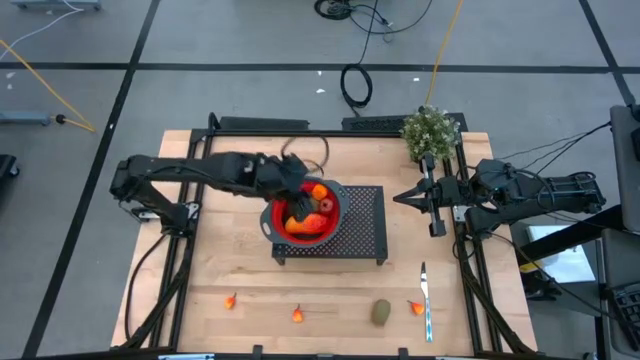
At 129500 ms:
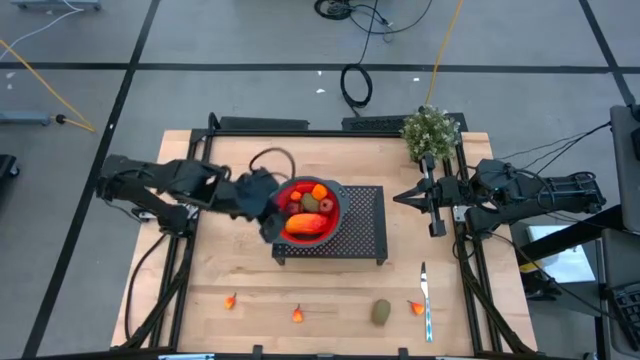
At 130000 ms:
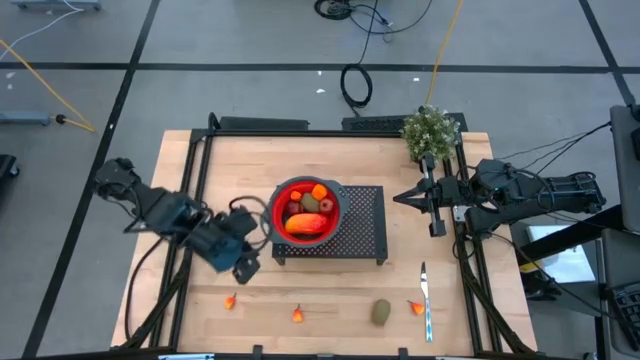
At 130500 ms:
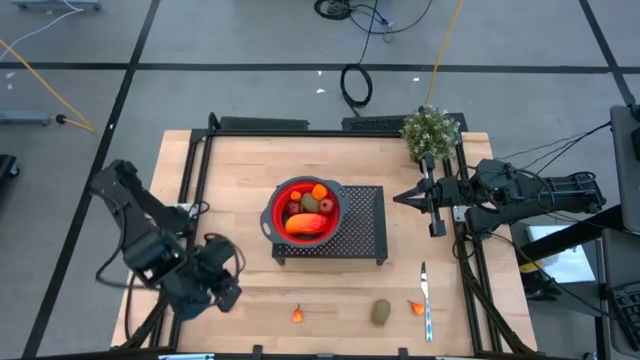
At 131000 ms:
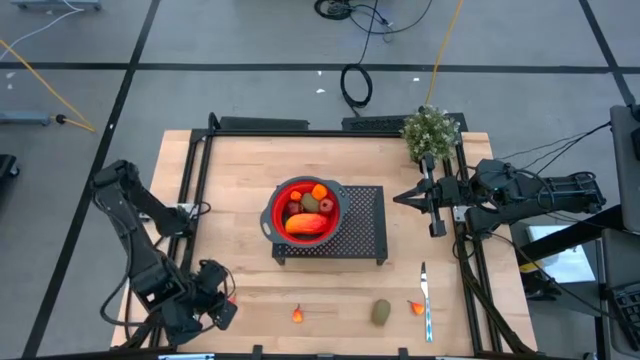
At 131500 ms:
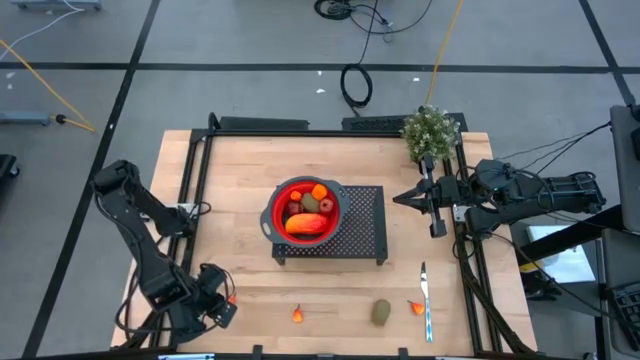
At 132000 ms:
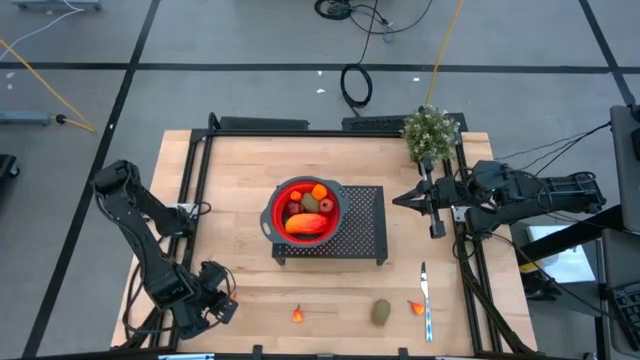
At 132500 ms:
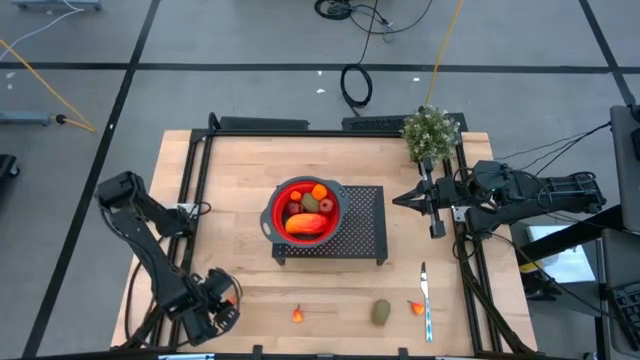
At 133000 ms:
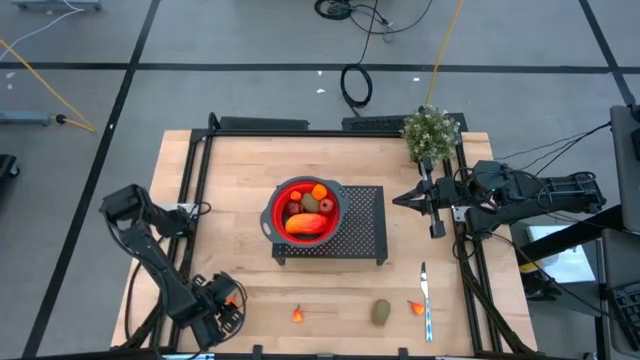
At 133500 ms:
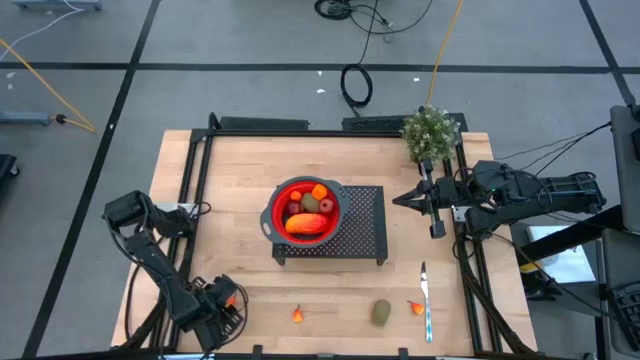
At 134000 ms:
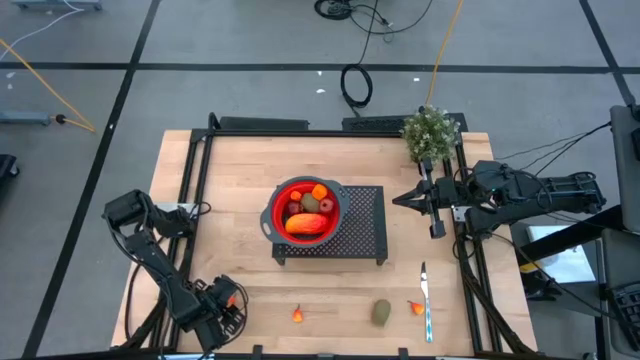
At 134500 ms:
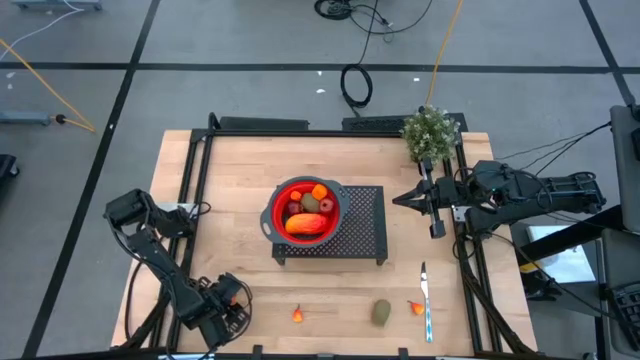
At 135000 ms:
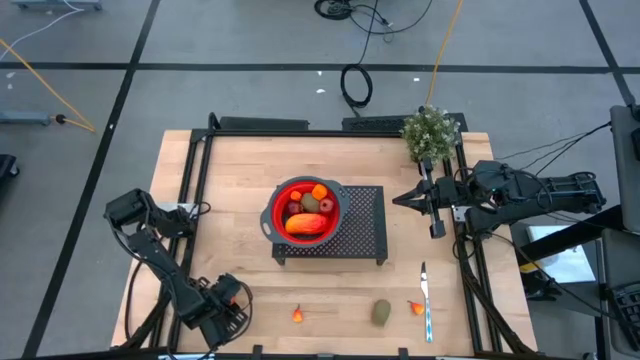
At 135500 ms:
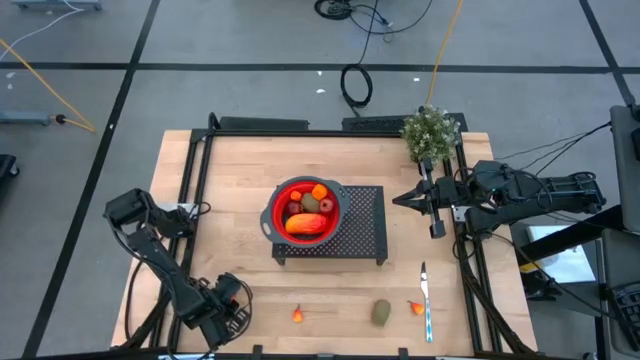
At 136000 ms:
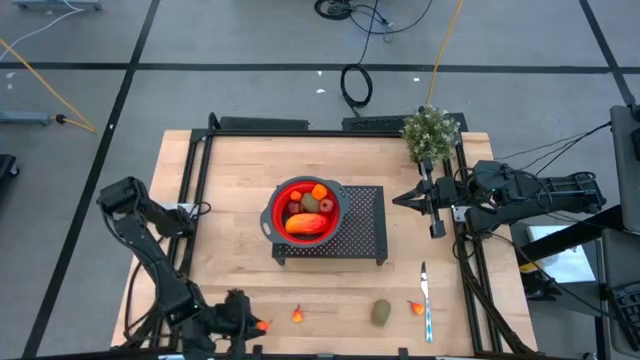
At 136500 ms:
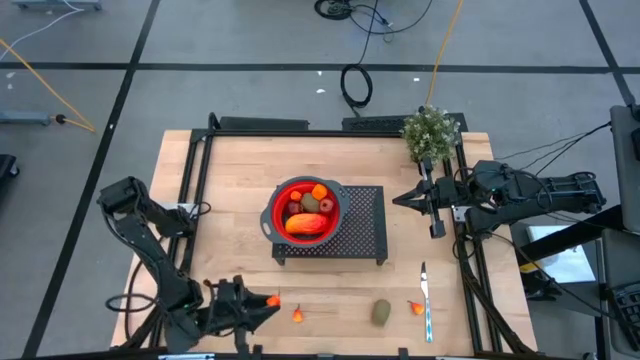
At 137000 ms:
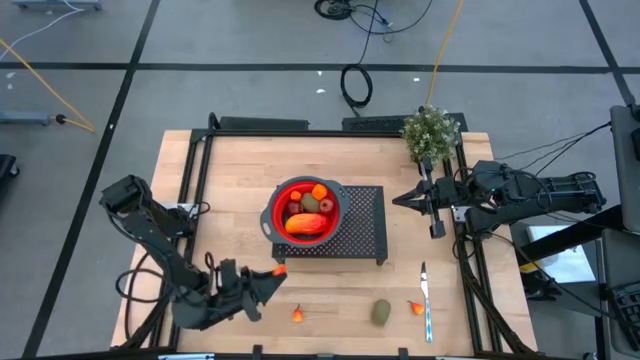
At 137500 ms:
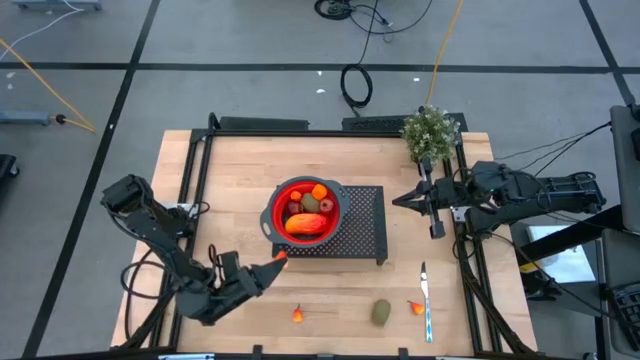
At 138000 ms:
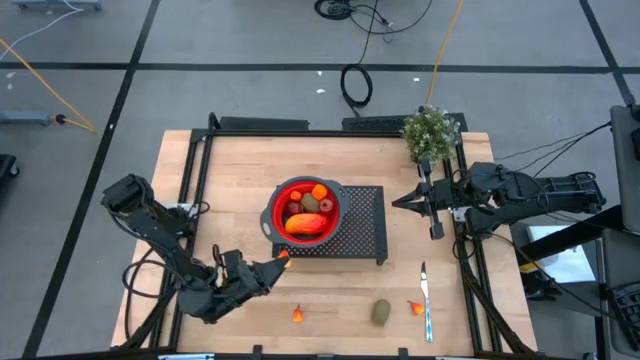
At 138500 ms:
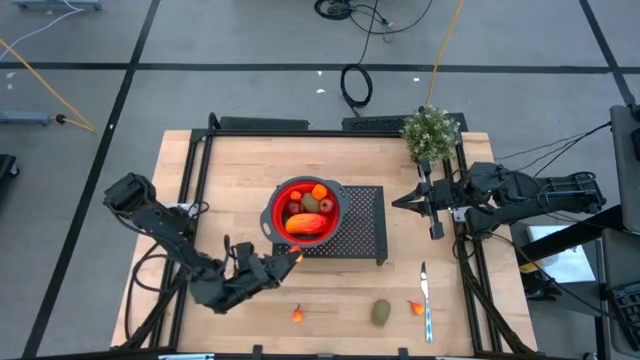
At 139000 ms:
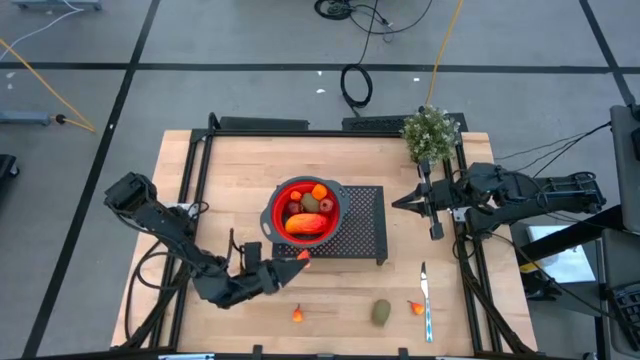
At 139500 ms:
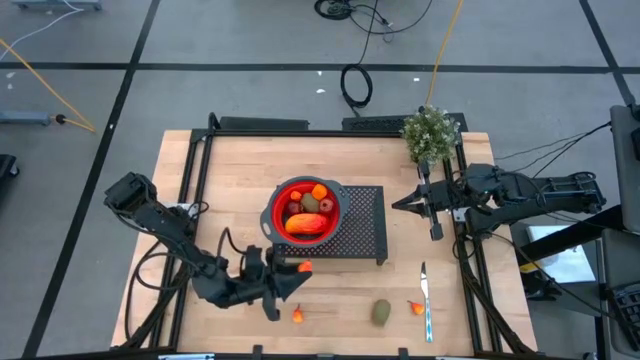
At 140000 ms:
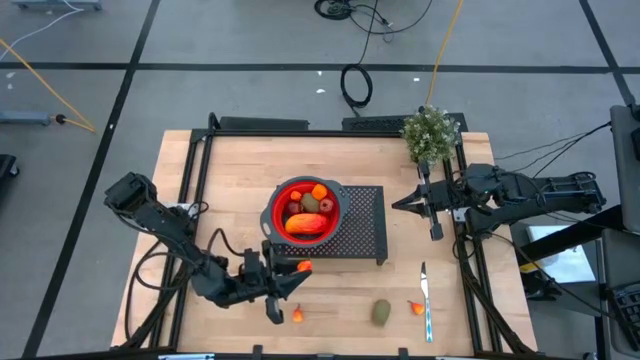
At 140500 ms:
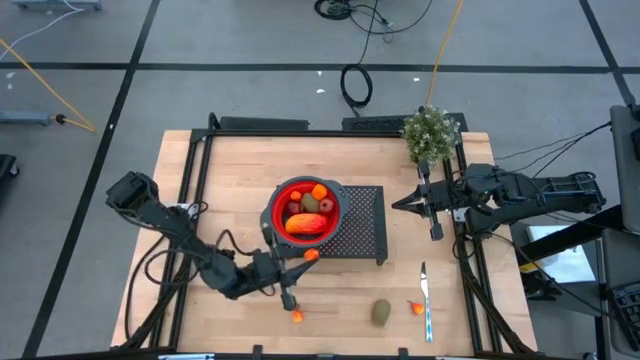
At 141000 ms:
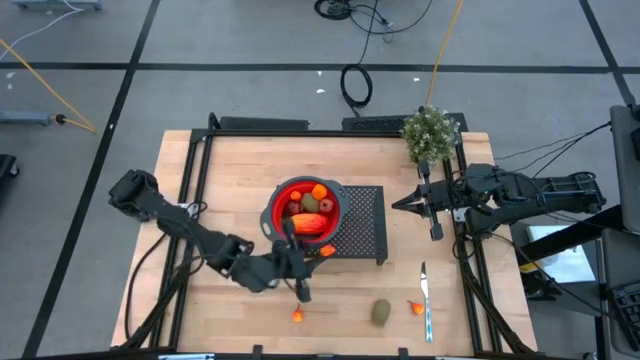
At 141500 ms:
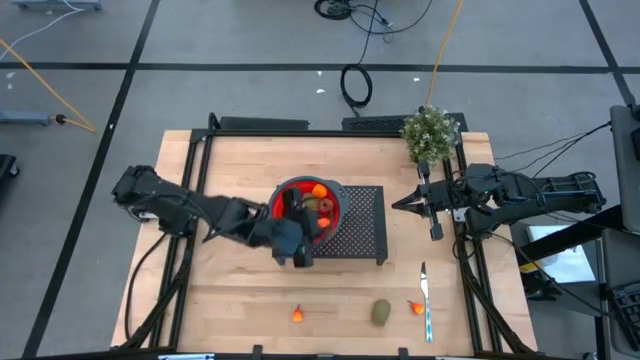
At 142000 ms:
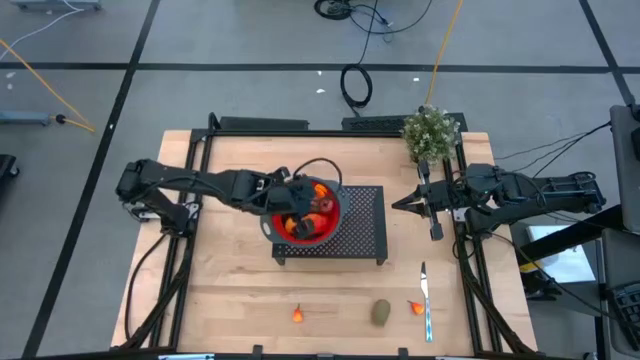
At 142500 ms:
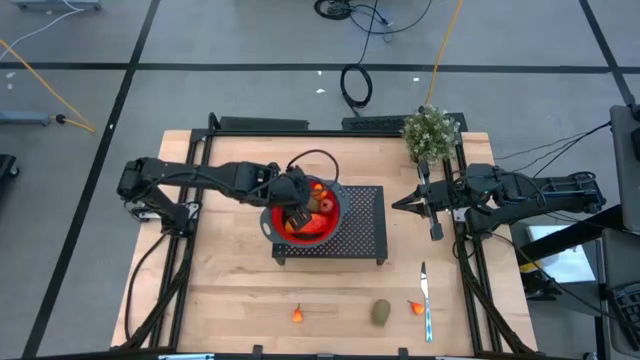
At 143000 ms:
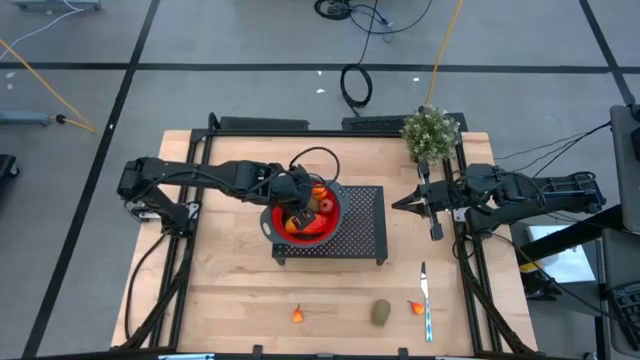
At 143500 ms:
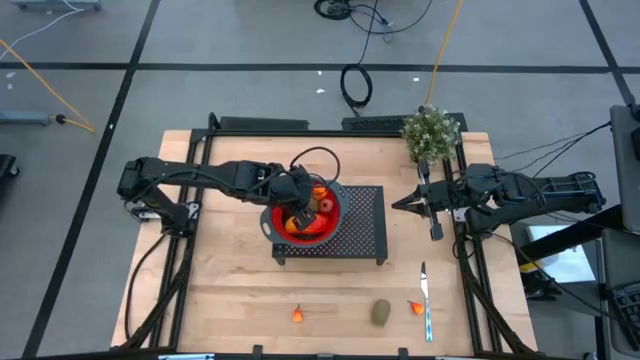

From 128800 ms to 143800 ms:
Task: Pick & Place Fruit
Put the orange pear into the red strainer bowl on the shelf

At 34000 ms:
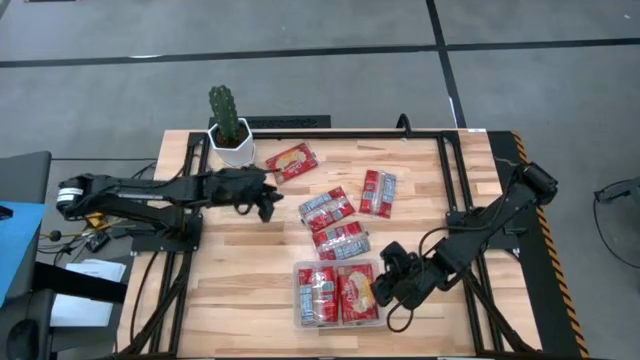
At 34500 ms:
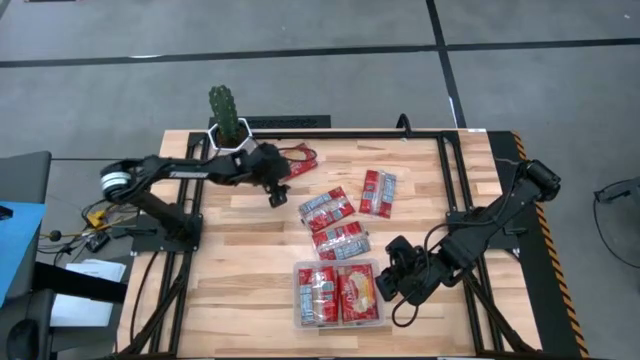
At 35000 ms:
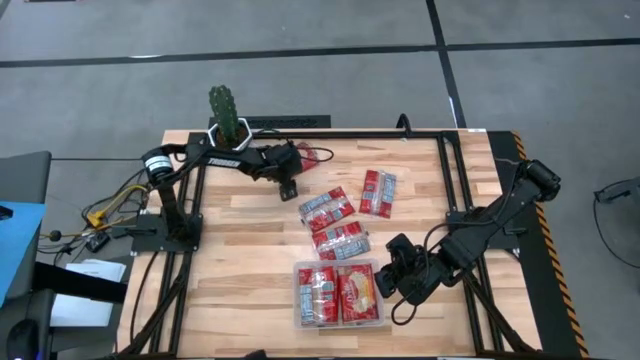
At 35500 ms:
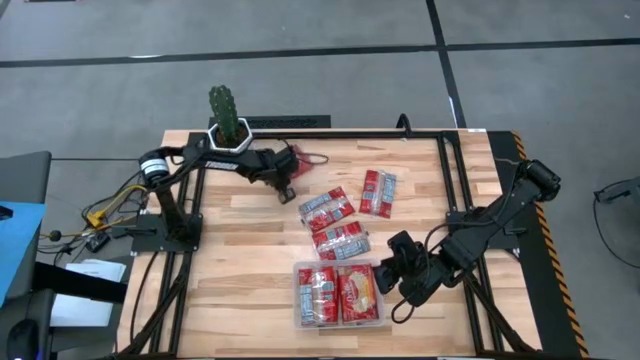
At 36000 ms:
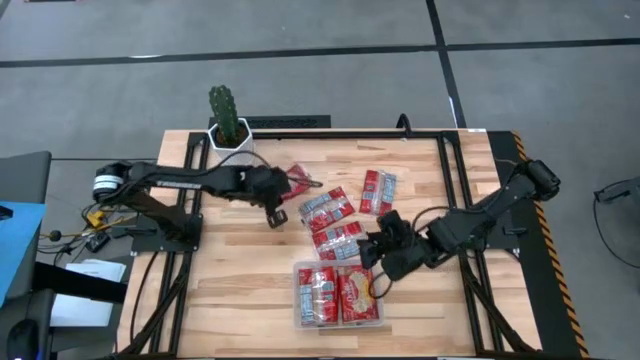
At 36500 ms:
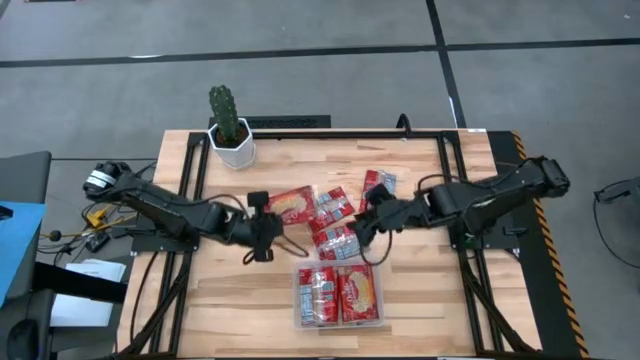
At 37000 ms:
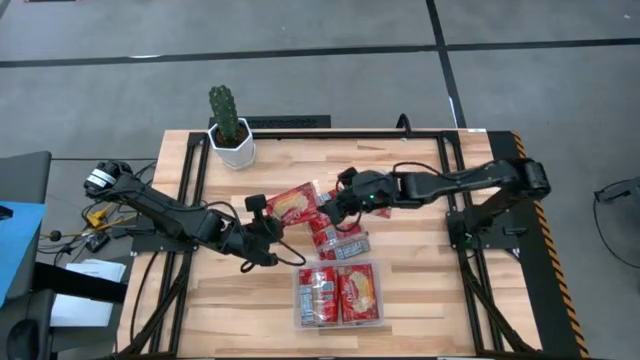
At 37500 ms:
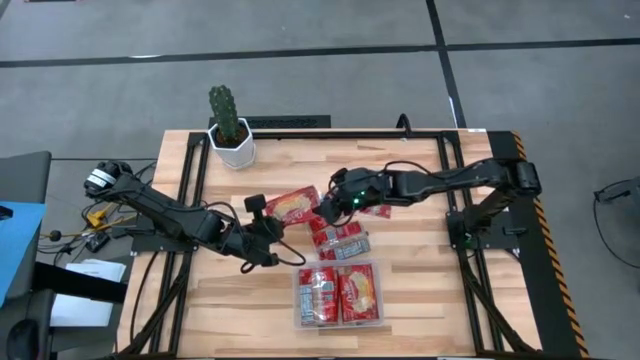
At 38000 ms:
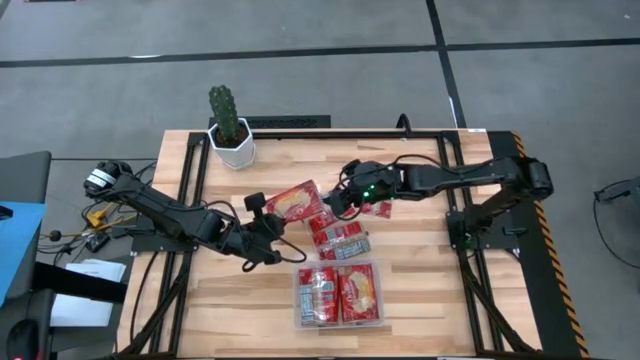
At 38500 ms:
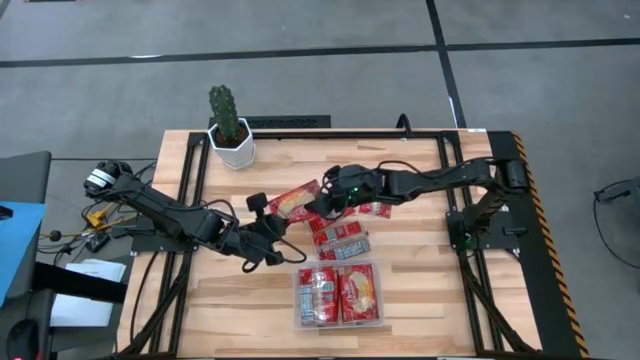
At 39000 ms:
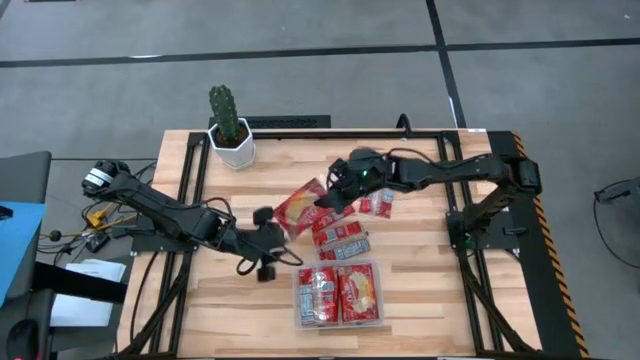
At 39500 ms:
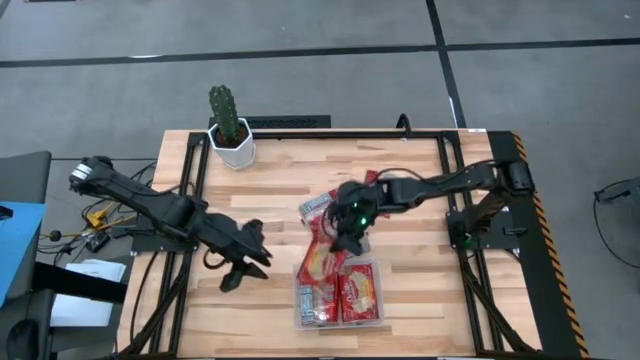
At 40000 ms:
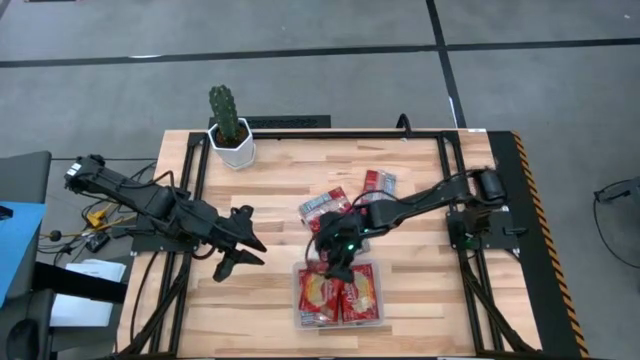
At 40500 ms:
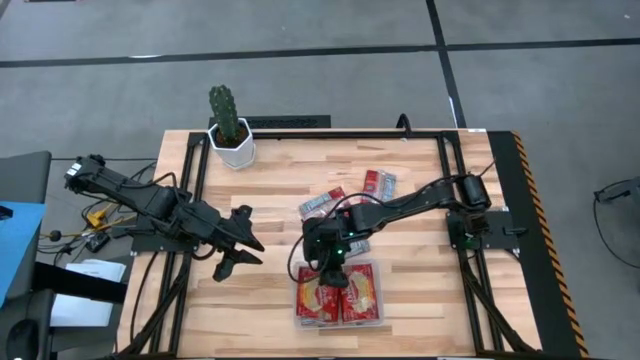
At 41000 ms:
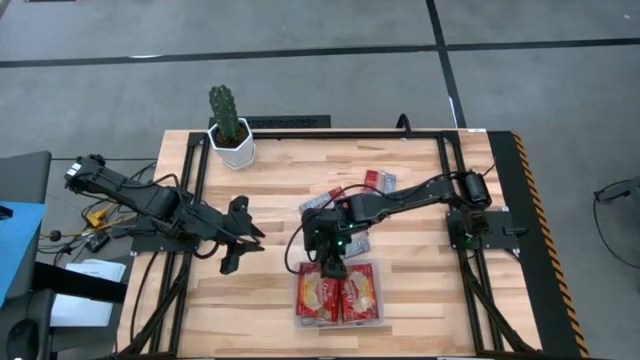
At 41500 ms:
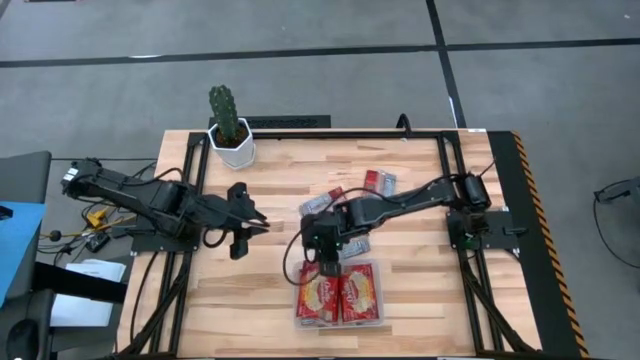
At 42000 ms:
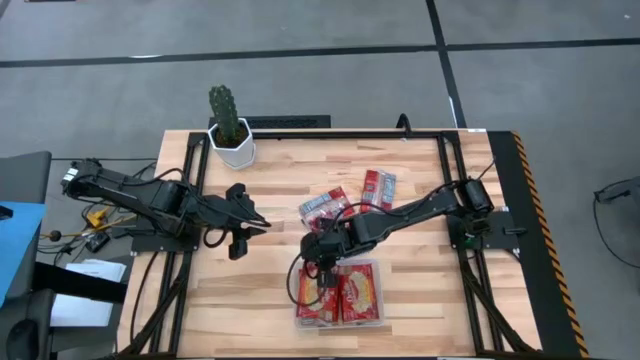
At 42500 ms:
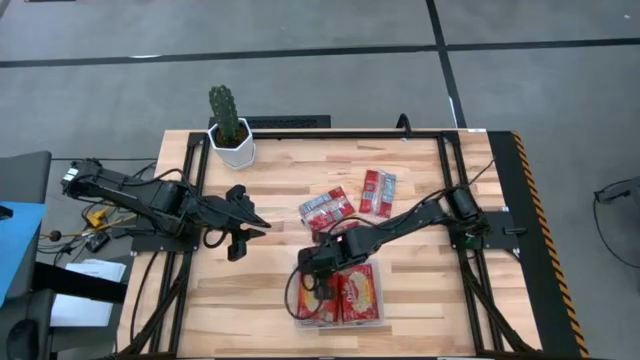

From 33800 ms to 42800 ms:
Task: Sort popcorn bags into baskets
Put the red popcorn bag into the transparent bin
